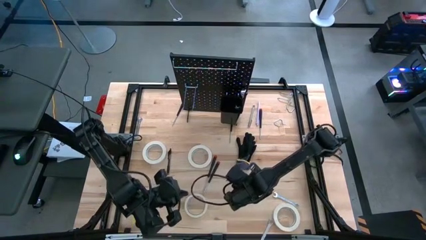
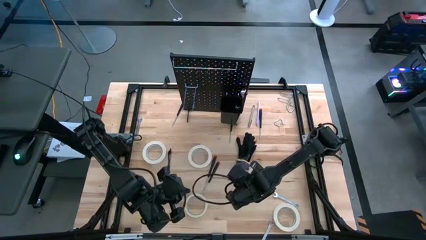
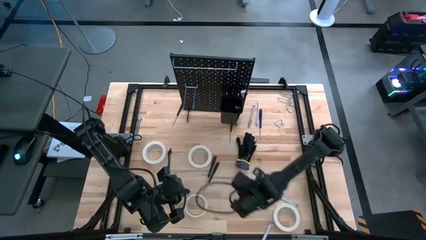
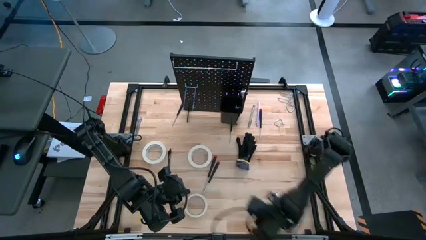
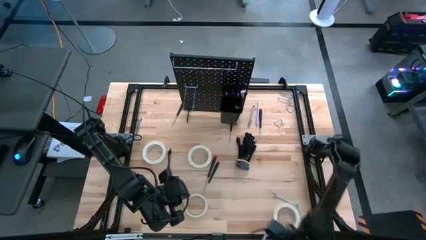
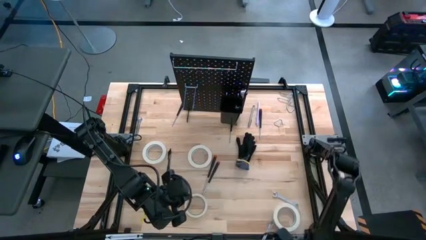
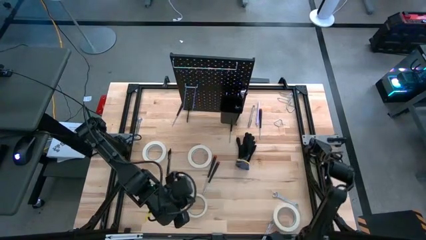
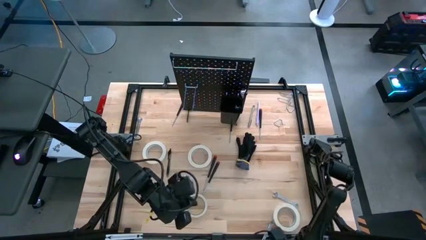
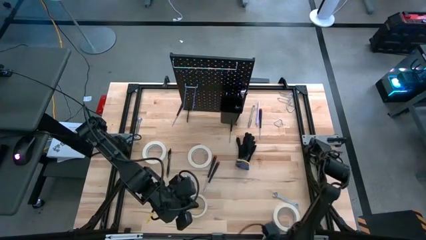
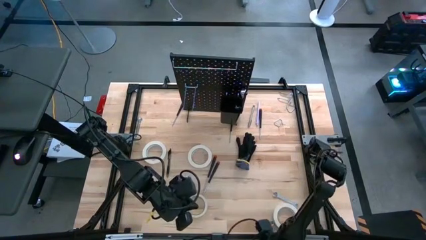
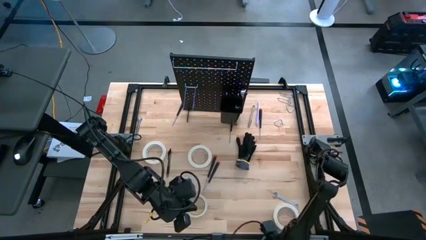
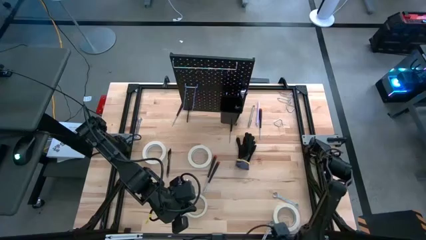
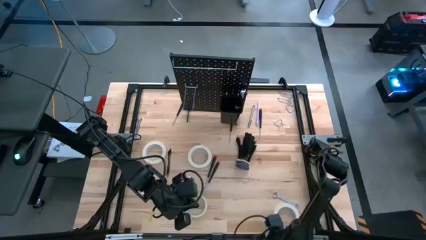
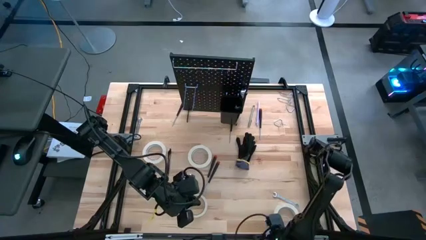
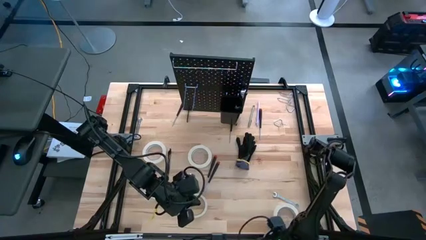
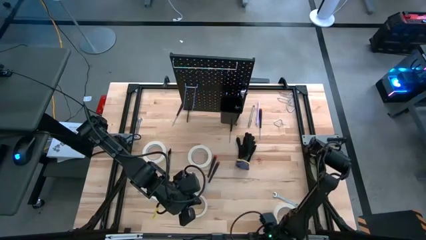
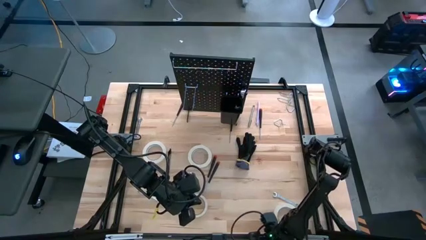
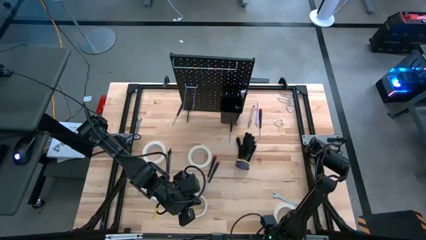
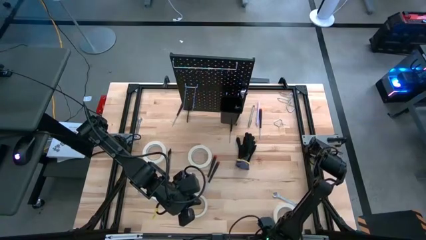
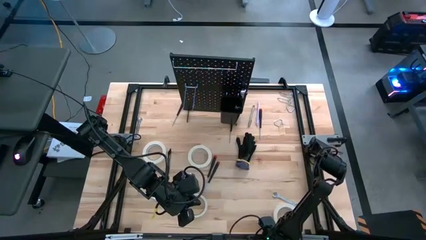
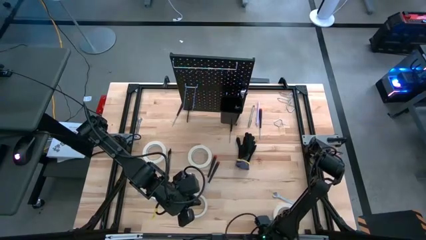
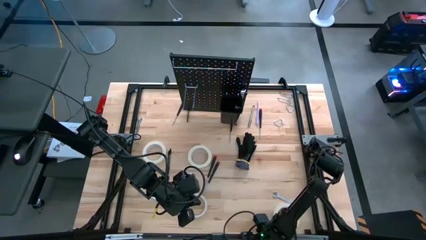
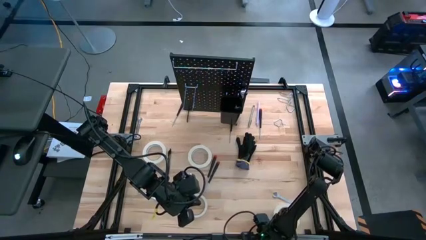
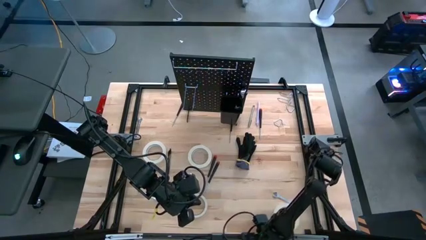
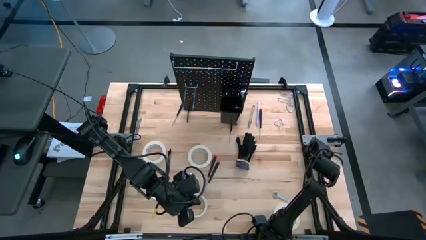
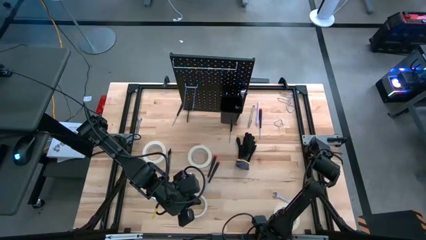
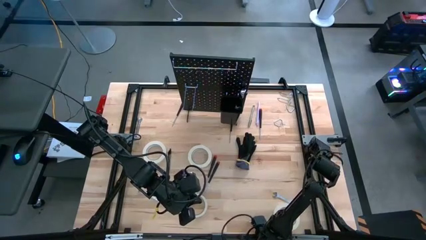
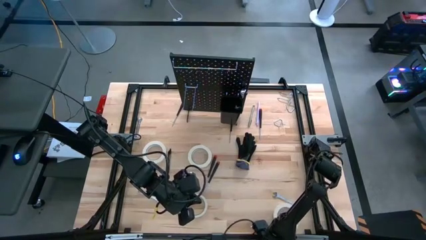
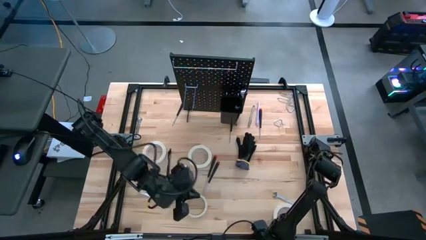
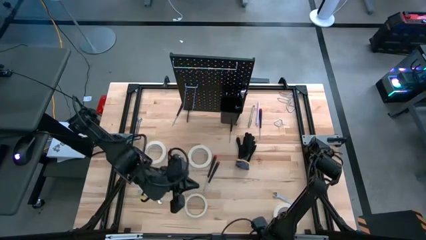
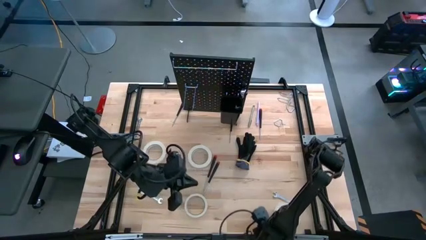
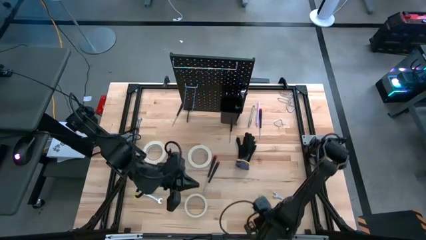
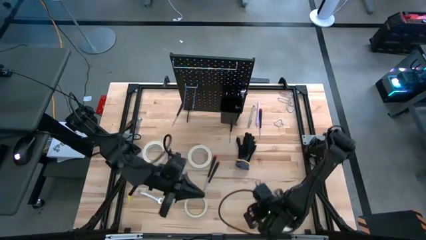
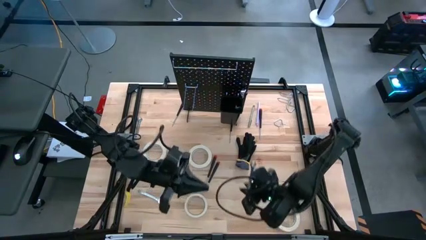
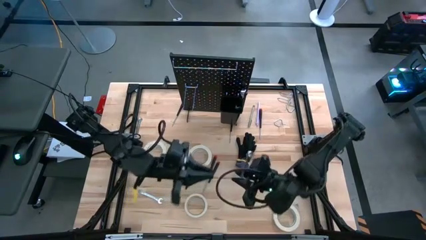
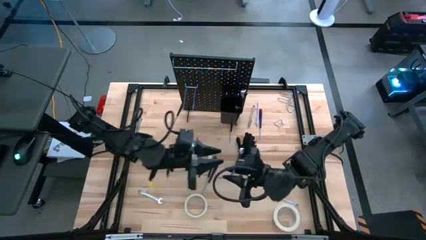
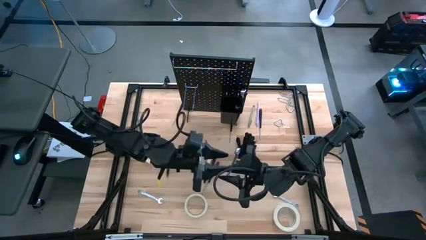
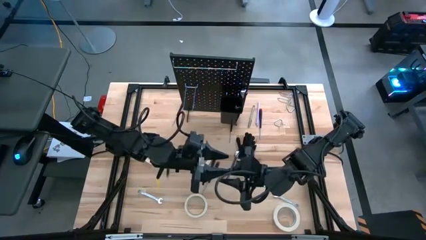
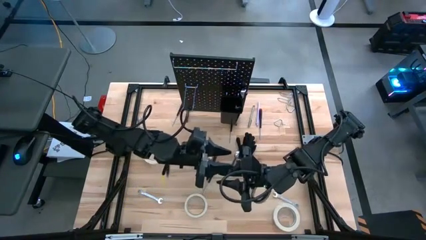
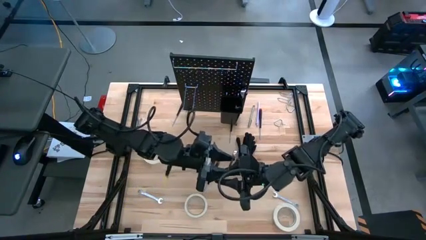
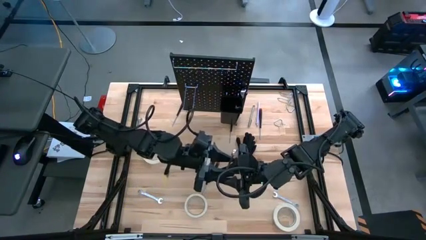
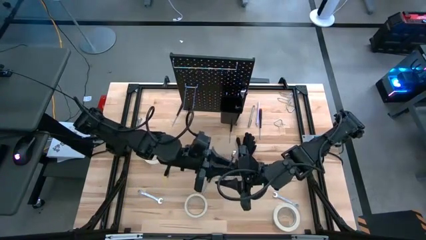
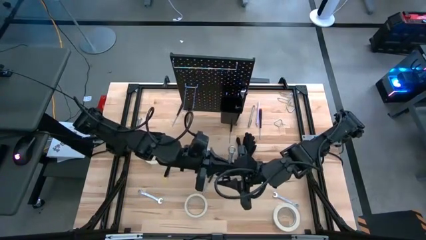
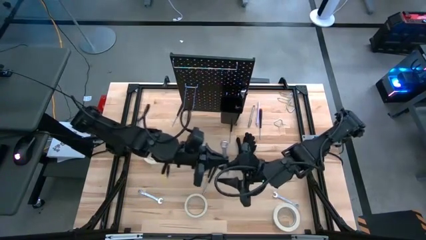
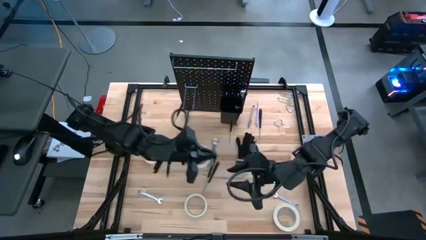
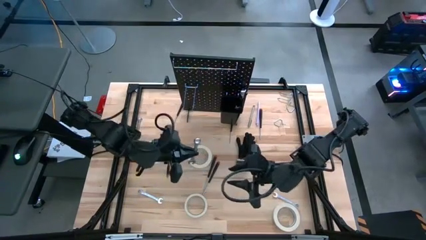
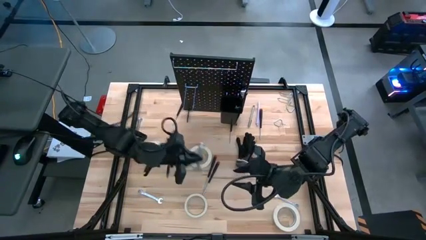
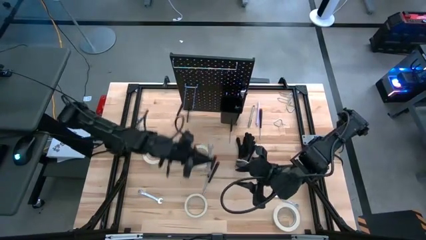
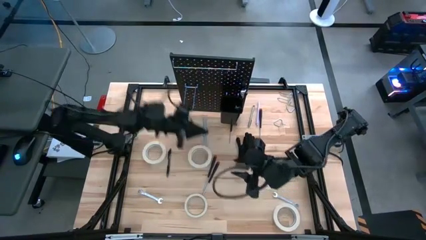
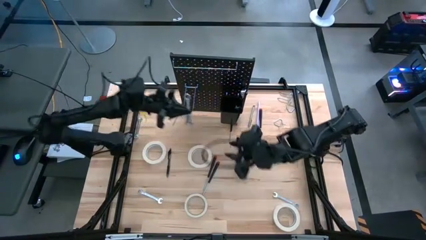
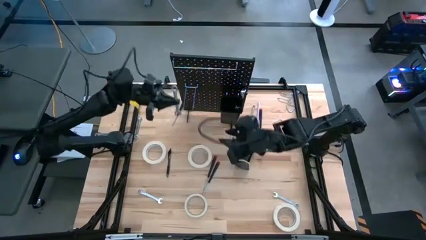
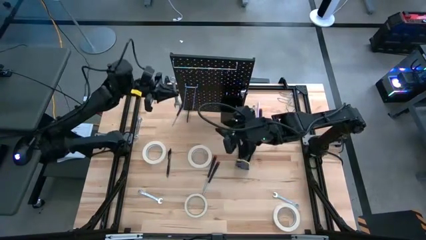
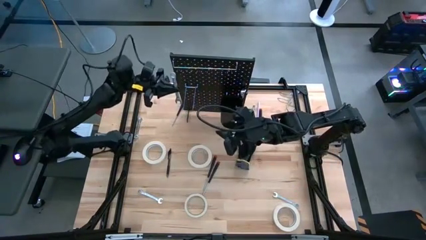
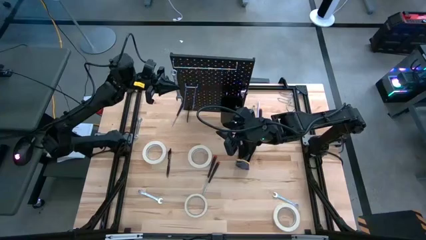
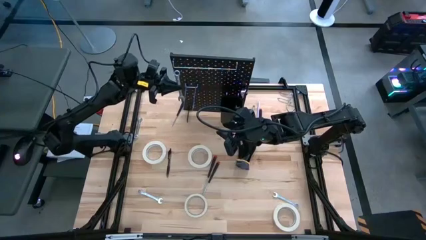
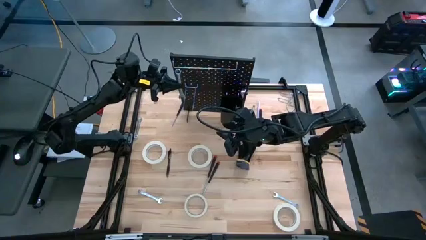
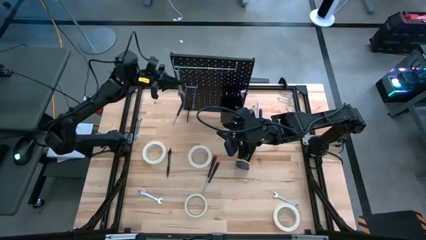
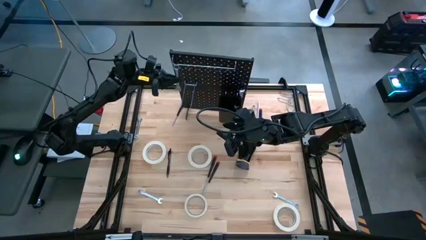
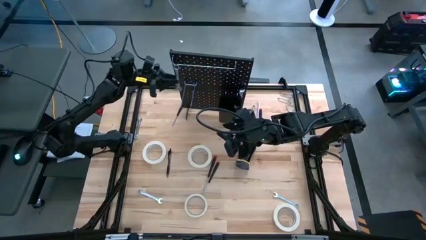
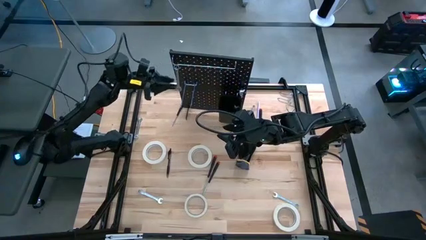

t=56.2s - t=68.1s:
Task: Hang tools onto peg board
Hang the 12 mm tool onto the pegboard on the top left
